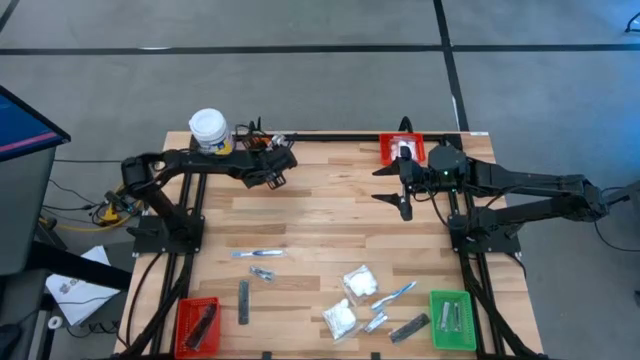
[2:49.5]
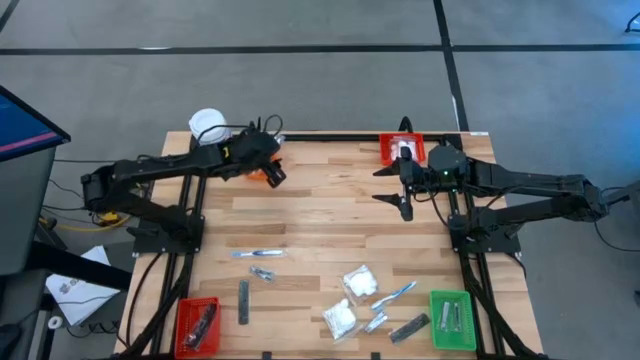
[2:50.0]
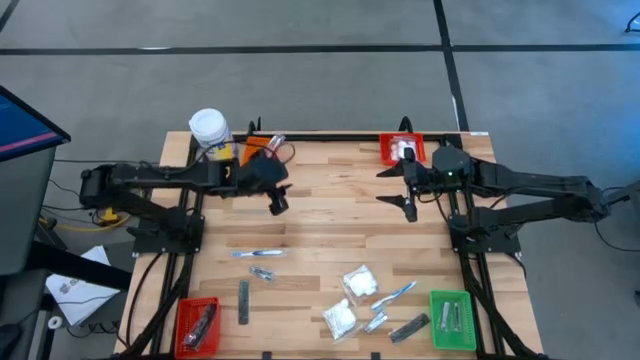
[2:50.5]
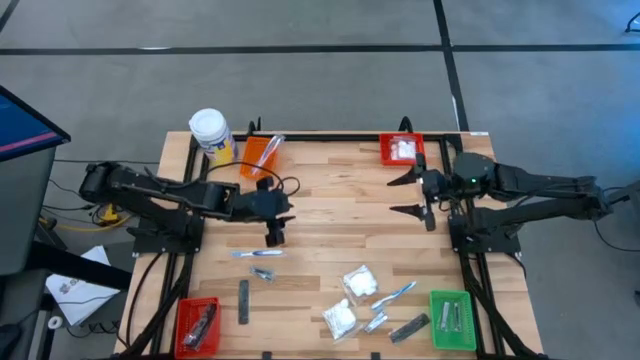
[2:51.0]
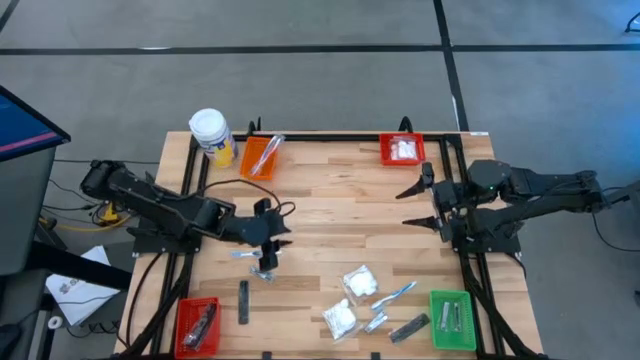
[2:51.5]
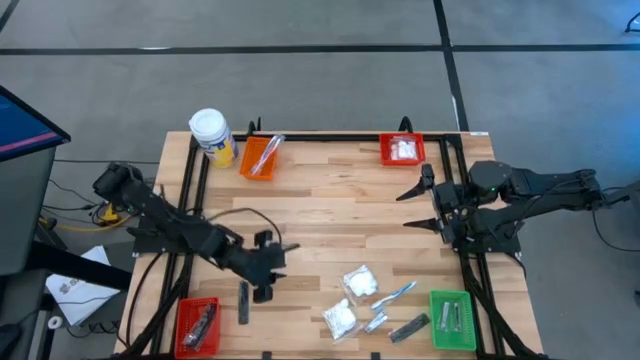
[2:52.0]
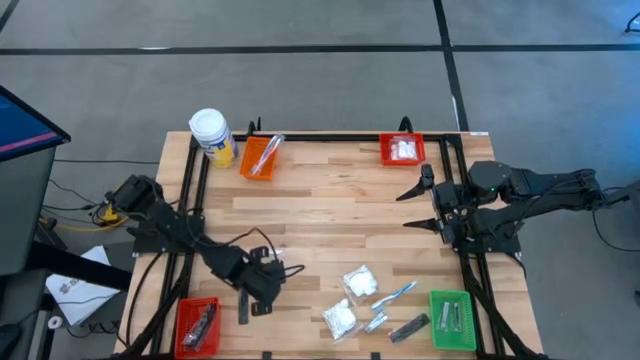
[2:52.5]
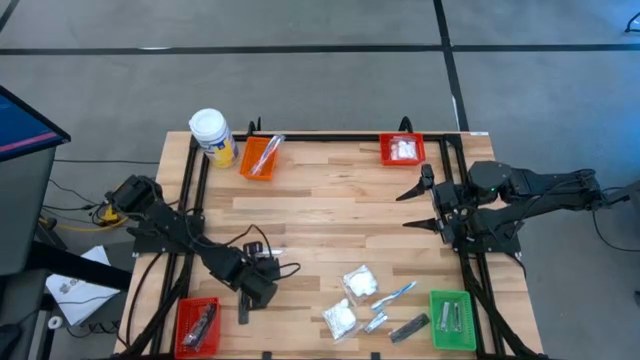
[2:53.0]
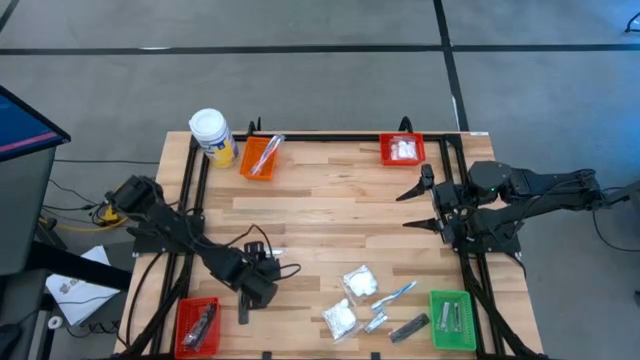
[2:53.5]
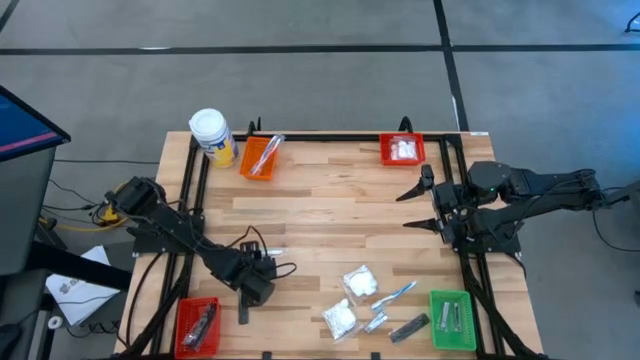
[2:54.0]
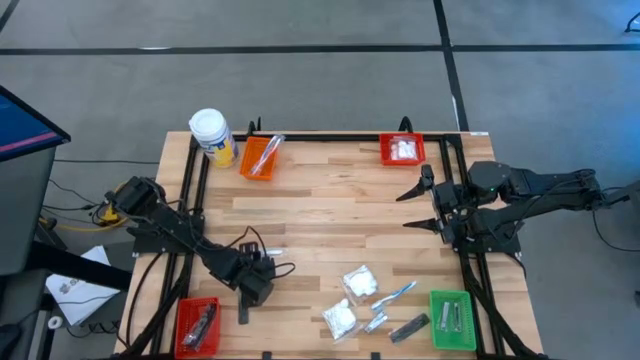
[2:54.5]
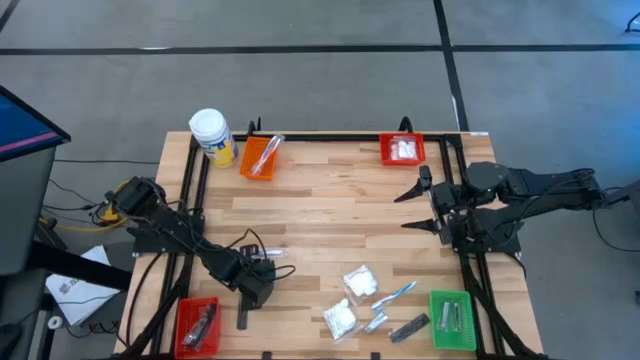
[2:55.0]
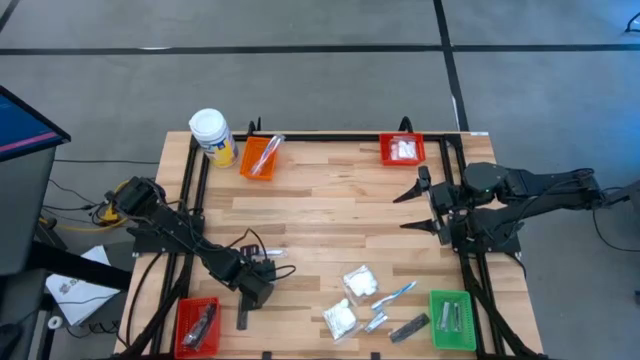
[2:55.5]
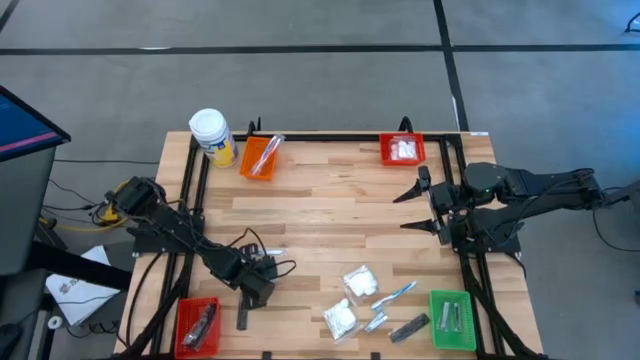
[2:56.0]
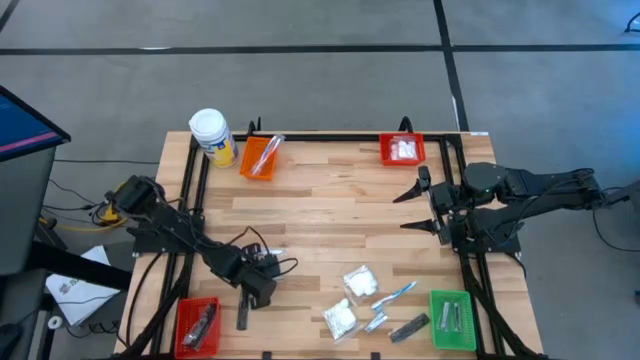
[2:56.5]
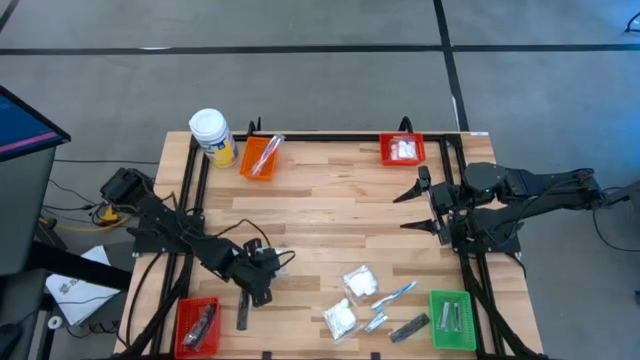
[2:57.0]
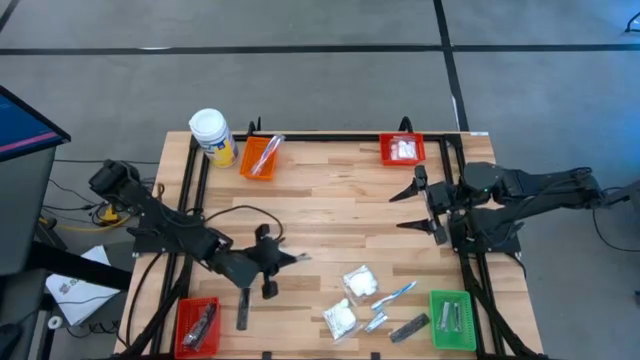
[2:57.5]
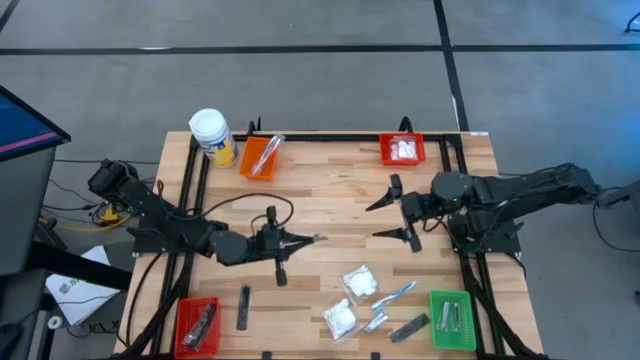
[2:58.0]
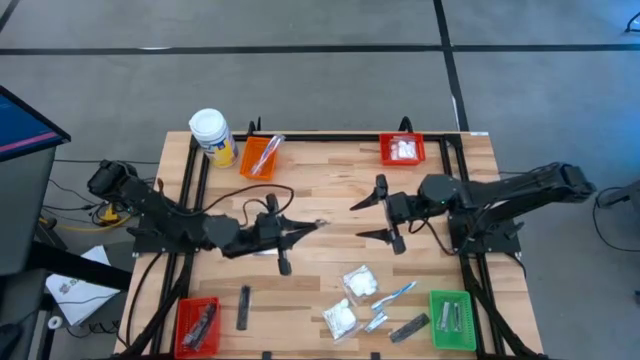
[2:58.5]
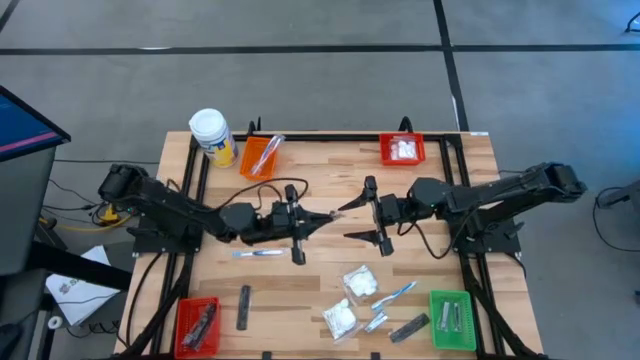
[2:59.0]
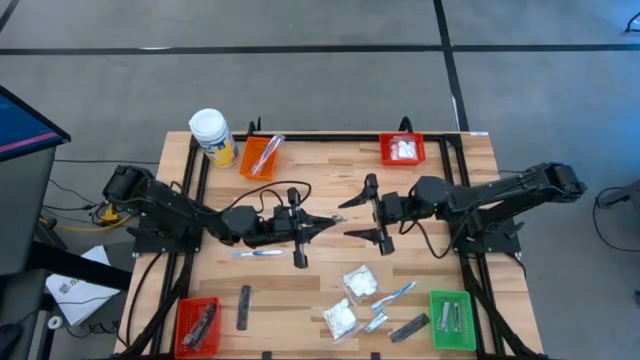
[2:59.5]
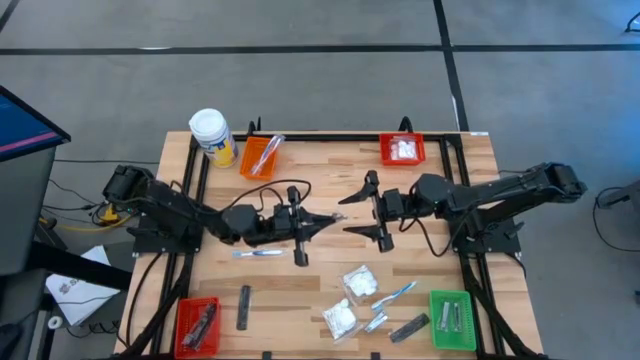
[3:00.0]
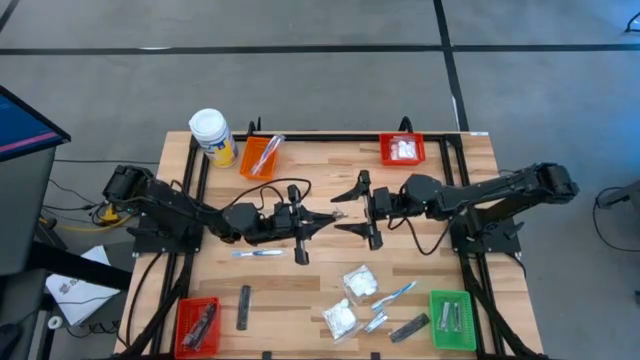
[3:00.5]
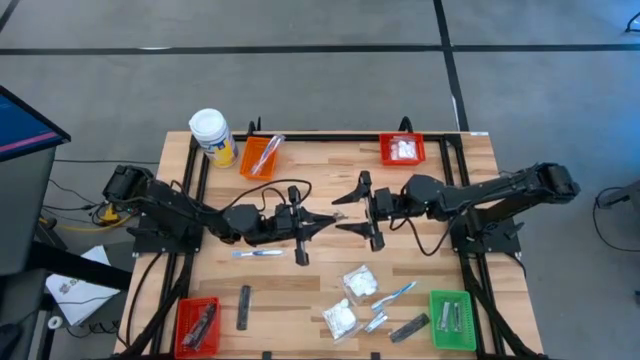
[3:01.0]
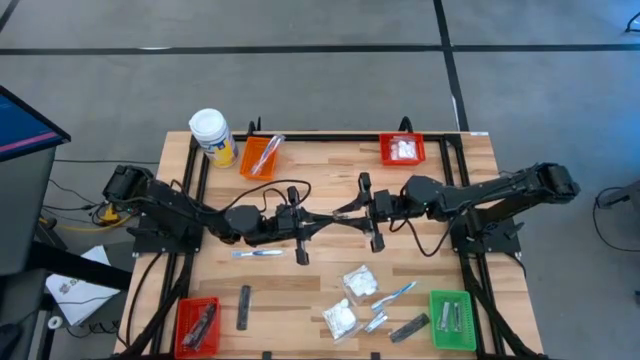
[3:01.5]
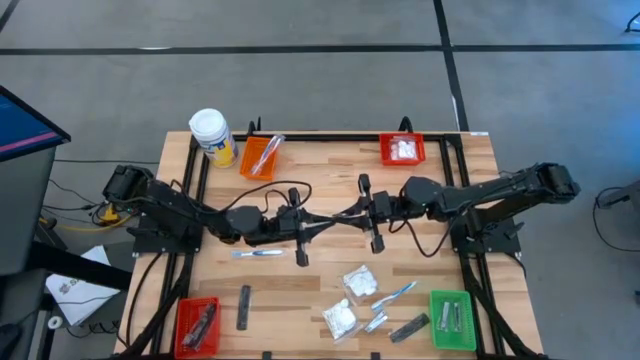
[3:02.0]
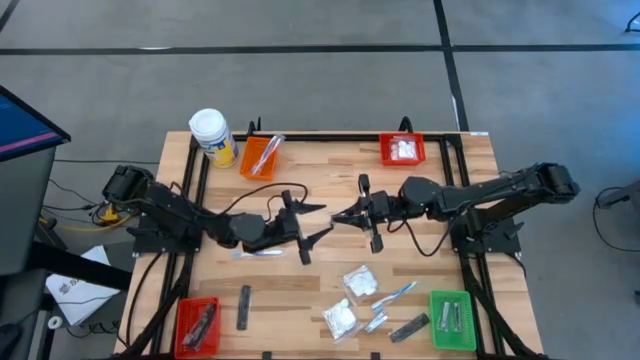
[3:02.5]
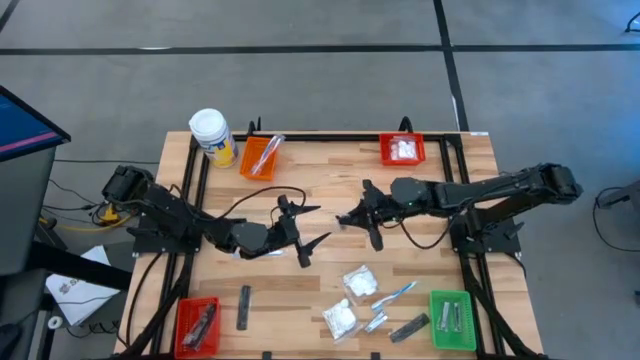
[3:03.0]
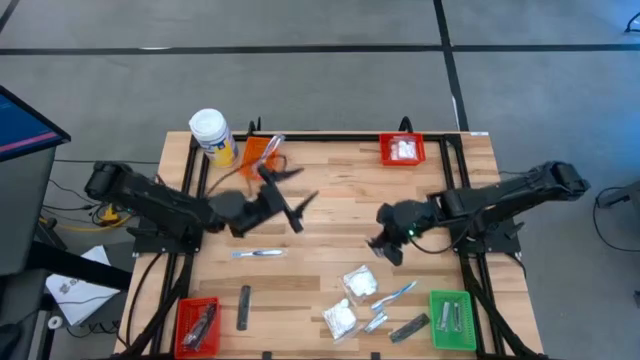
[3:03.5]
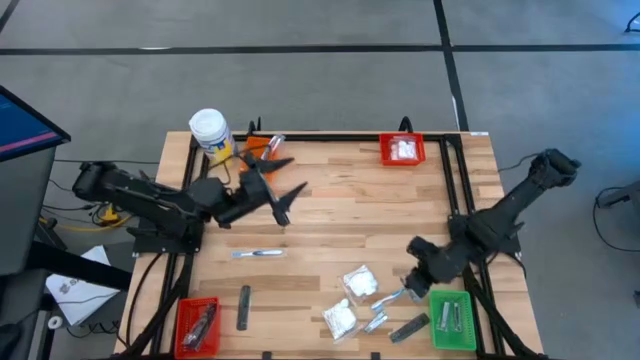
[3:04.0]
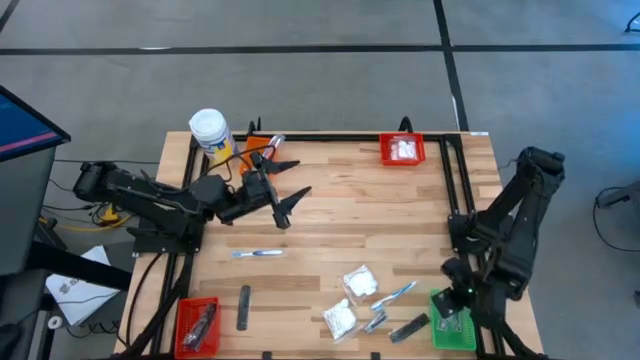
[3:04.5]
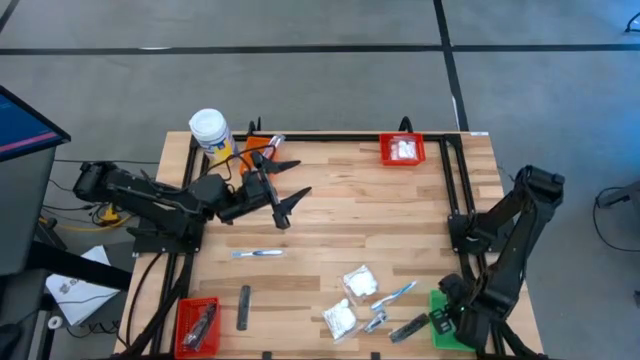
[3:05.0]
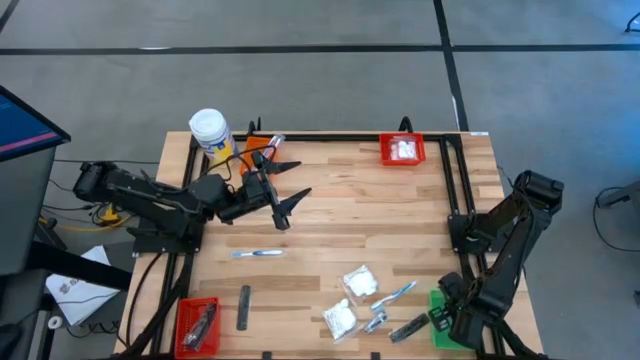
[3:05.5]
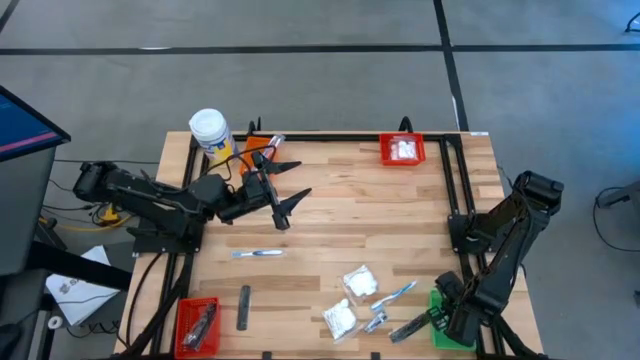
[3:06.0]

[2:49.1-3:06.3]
Task: Pick & Place Travel size toiletries
Put the left nail cutter into green bin

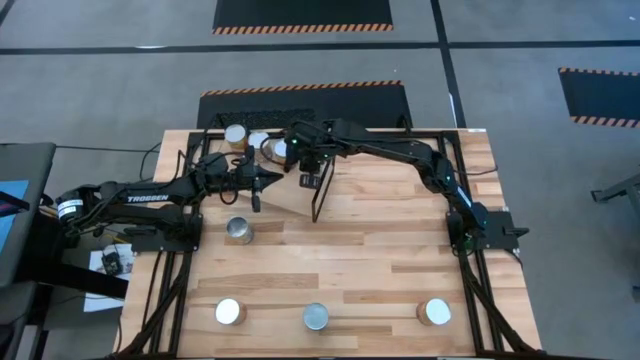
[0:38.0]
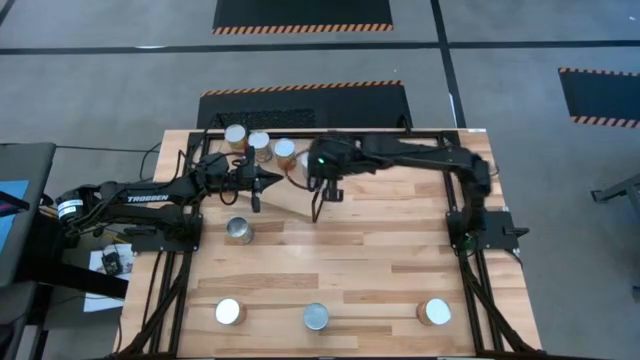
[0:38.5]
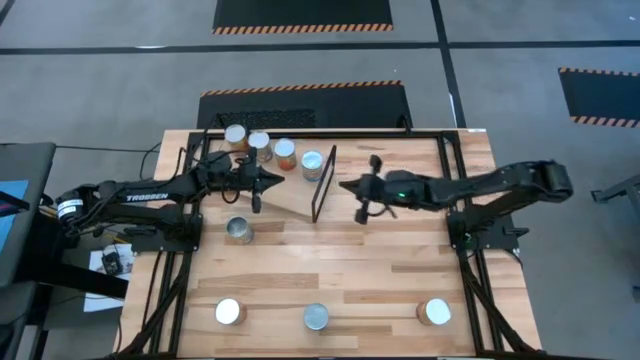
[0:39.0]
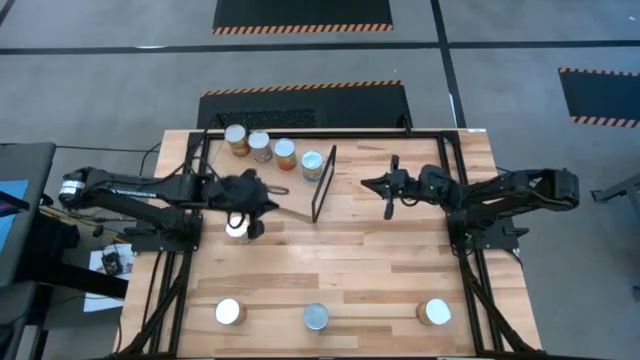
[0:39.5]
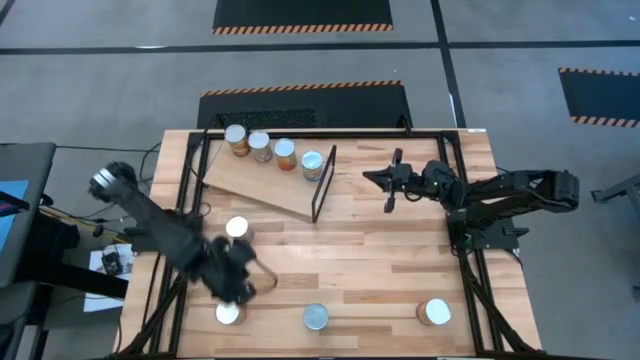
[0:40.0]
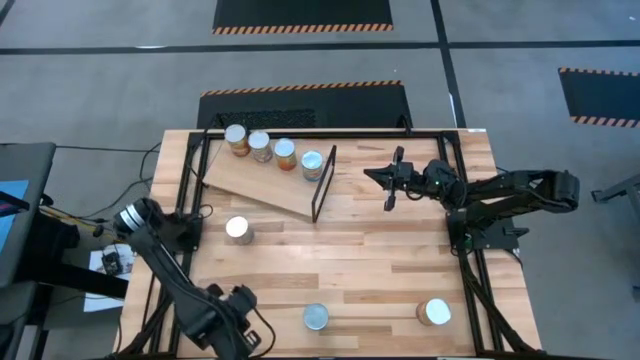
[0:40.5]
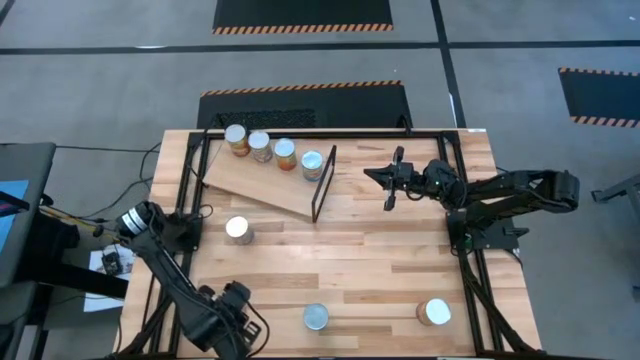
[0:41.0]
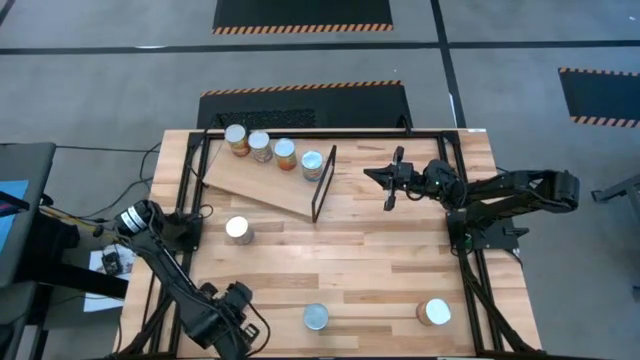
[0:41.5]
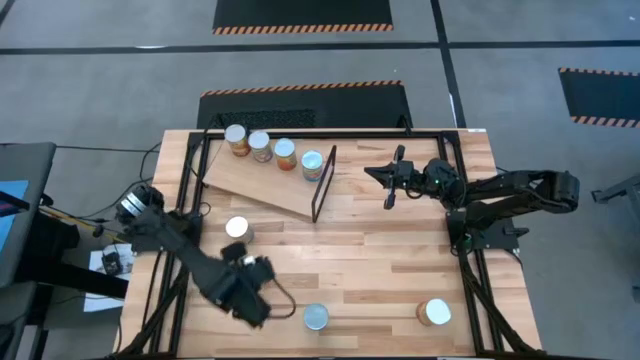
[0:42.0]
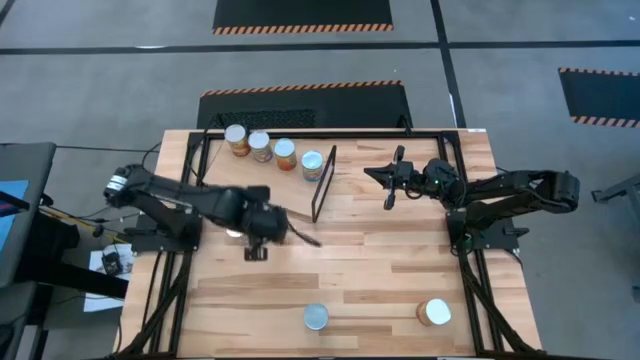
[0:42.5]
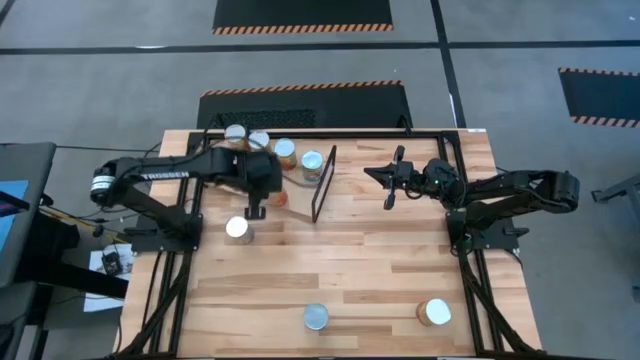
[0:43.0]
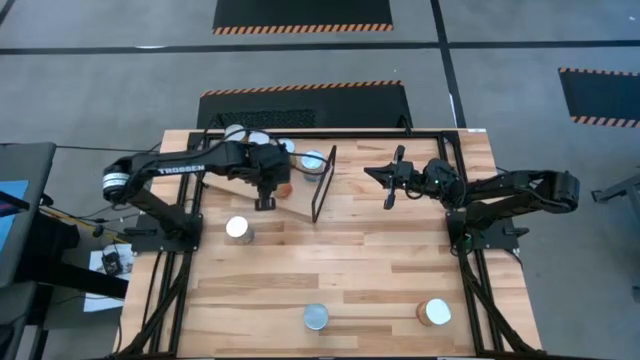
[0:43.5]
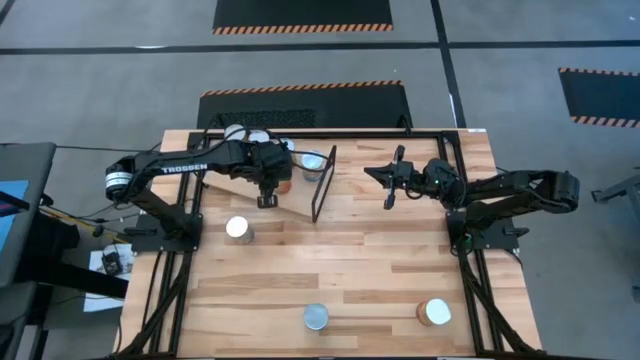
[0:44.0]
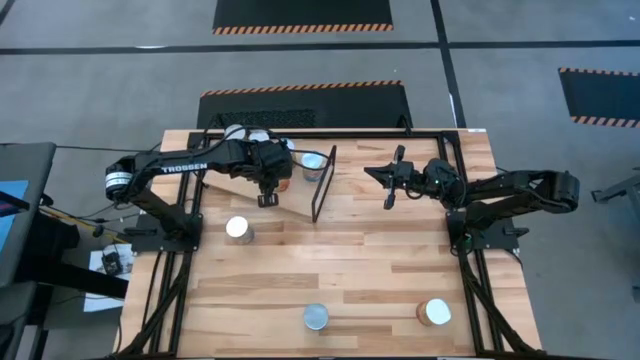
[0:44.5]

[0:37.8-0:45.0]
Task: Pick and place cans onto a shelf
Align the canned green beans with the other canned green beans on the shelf
